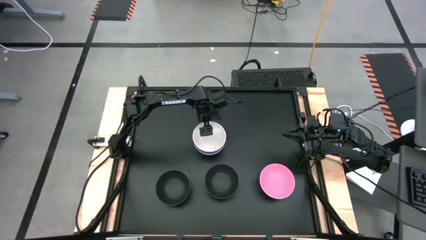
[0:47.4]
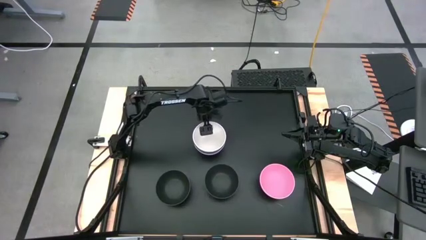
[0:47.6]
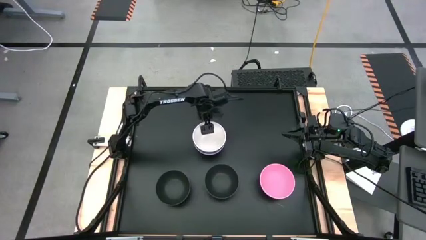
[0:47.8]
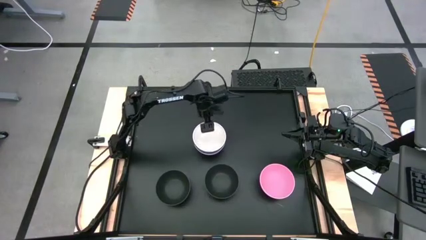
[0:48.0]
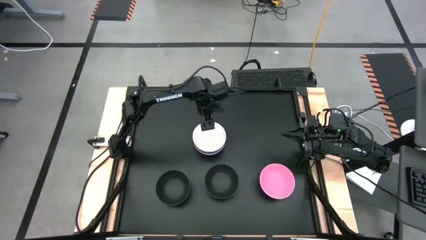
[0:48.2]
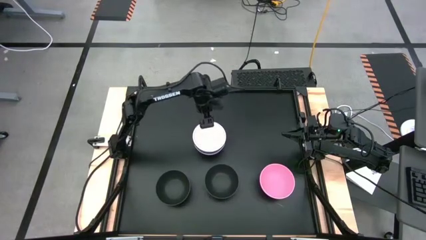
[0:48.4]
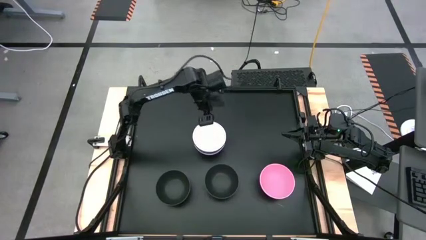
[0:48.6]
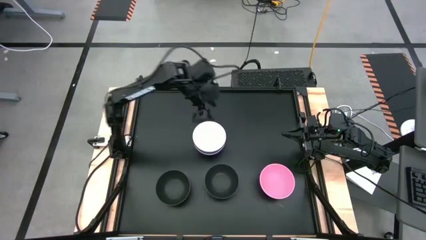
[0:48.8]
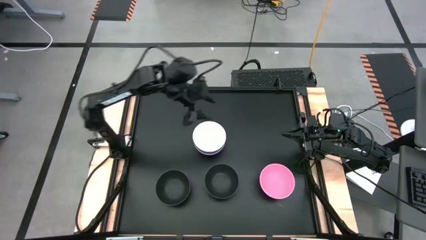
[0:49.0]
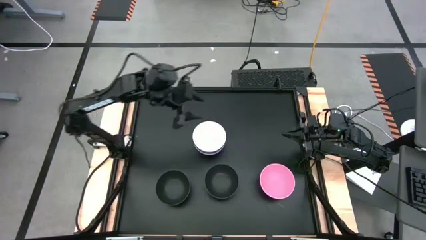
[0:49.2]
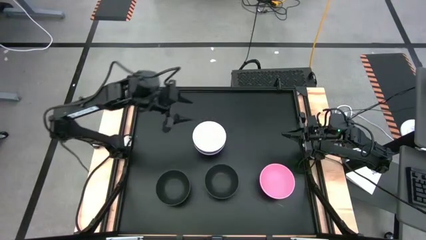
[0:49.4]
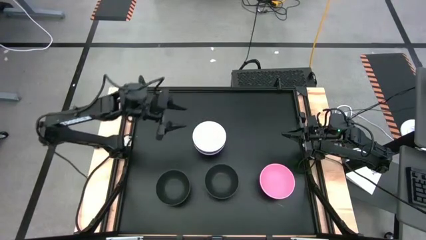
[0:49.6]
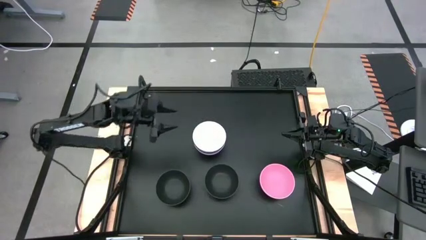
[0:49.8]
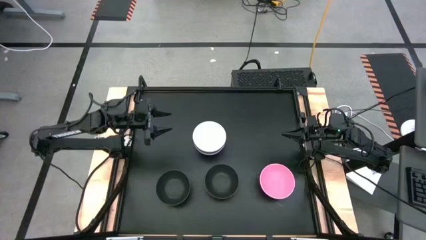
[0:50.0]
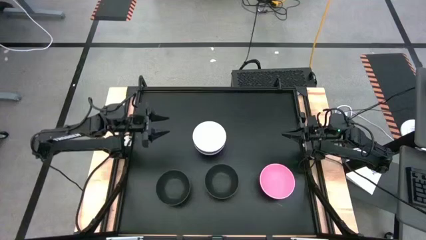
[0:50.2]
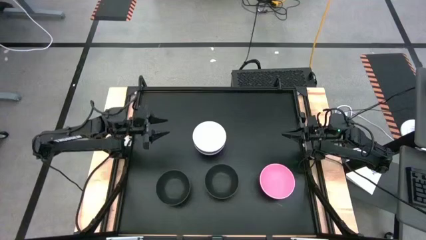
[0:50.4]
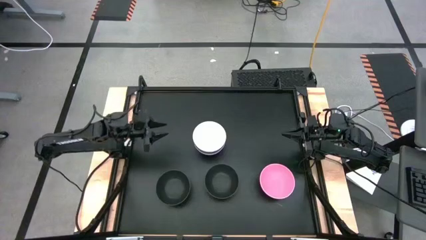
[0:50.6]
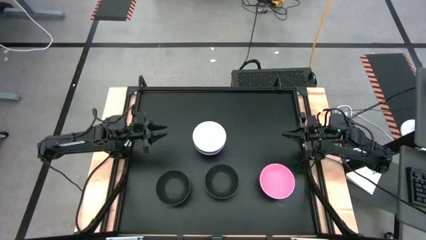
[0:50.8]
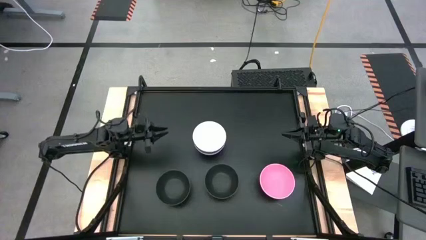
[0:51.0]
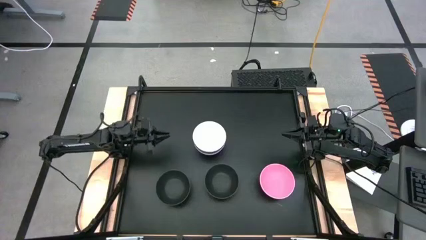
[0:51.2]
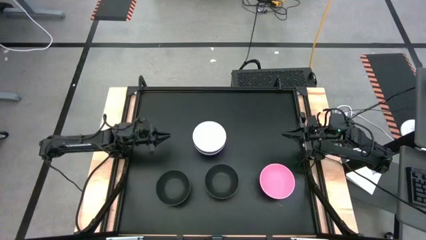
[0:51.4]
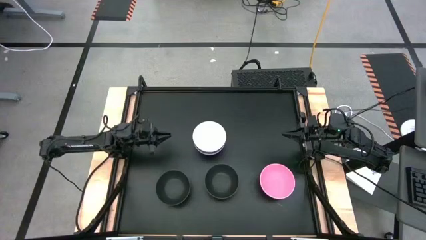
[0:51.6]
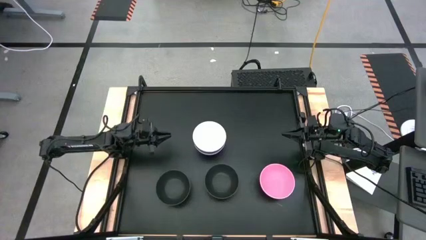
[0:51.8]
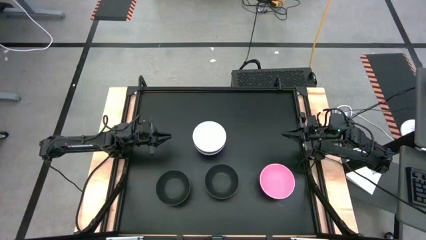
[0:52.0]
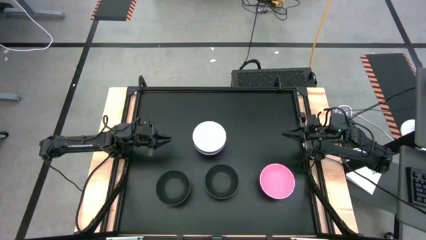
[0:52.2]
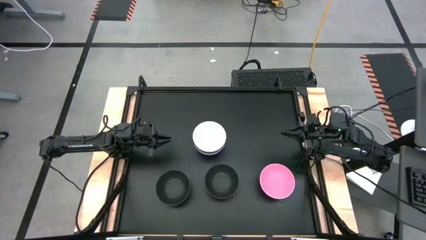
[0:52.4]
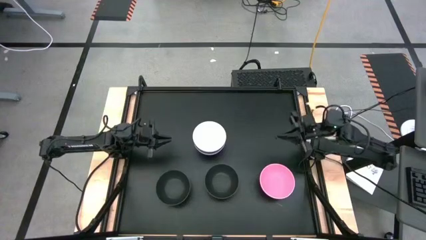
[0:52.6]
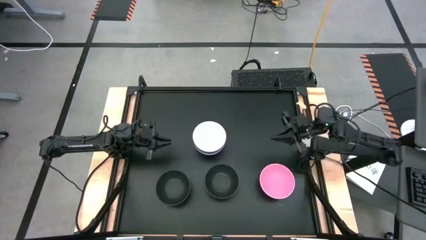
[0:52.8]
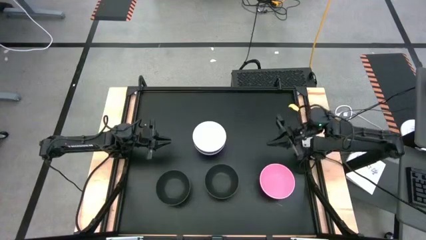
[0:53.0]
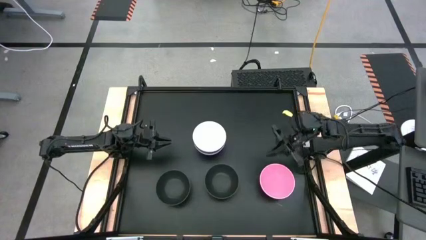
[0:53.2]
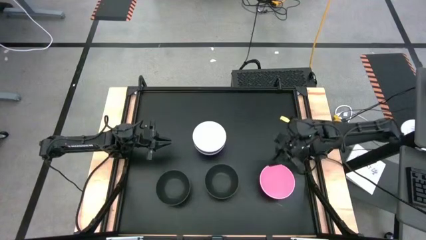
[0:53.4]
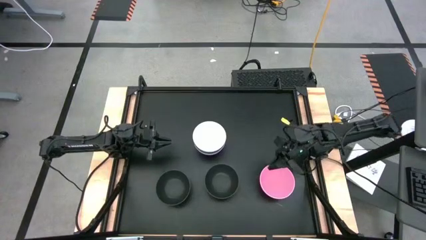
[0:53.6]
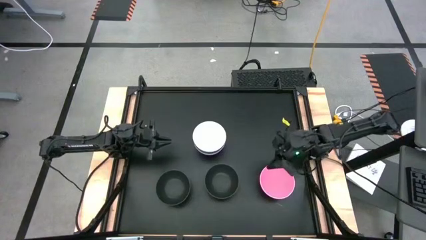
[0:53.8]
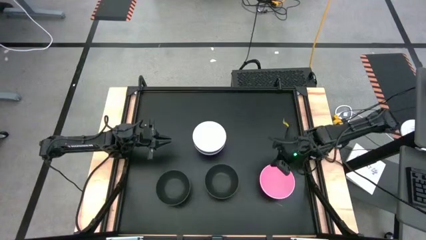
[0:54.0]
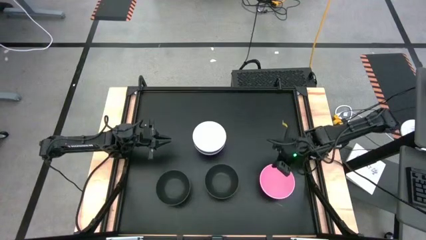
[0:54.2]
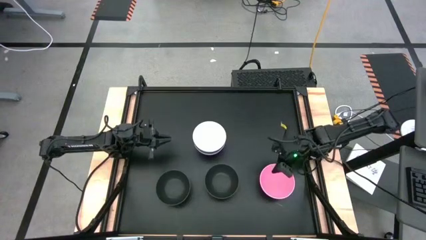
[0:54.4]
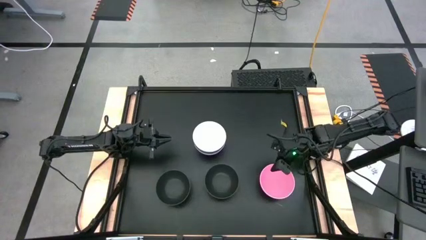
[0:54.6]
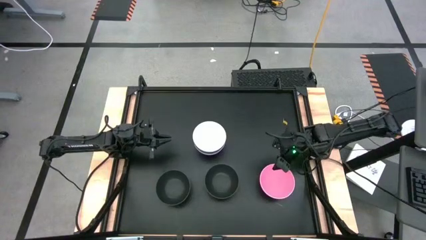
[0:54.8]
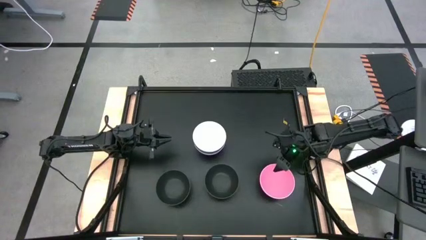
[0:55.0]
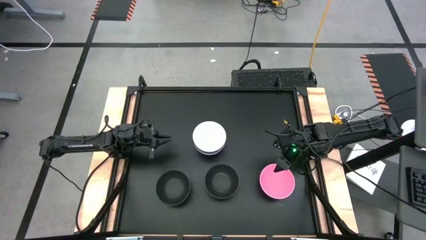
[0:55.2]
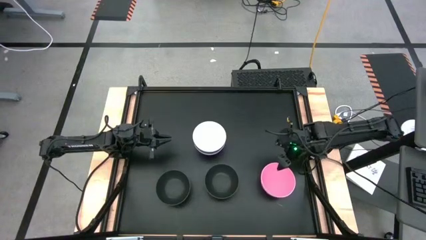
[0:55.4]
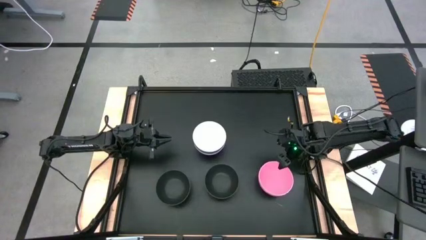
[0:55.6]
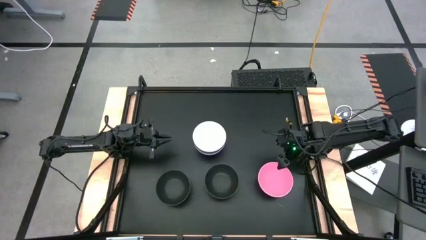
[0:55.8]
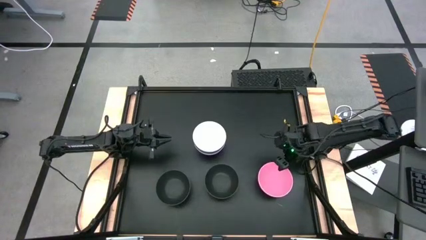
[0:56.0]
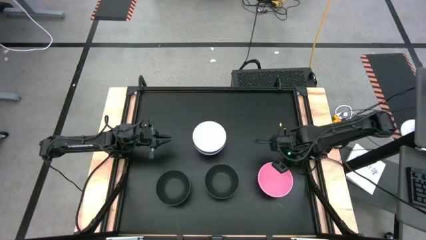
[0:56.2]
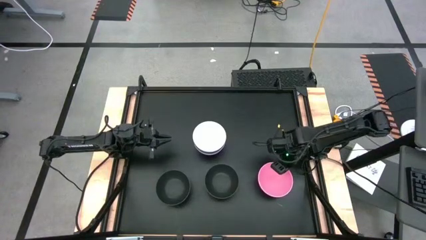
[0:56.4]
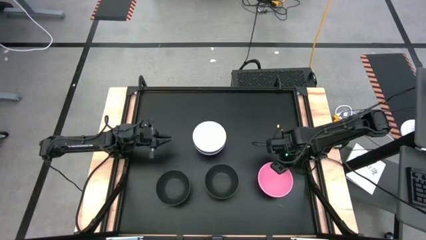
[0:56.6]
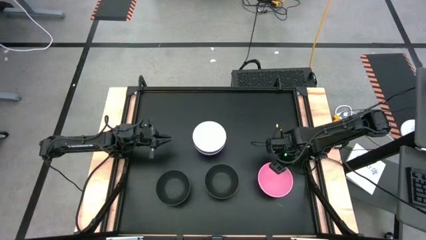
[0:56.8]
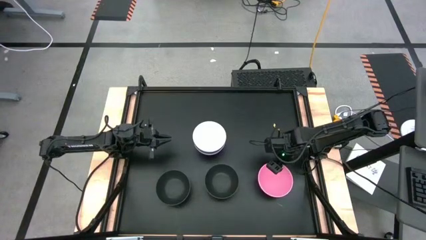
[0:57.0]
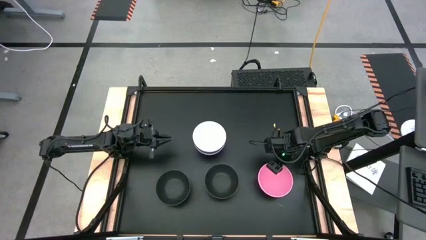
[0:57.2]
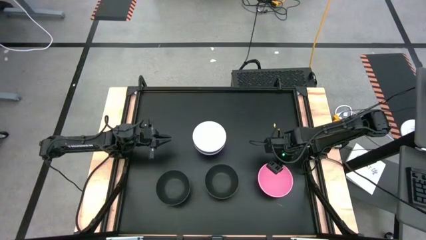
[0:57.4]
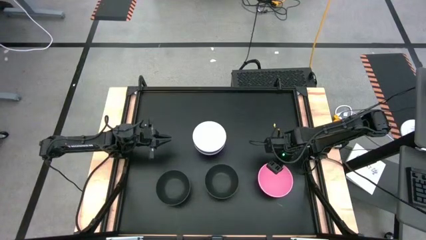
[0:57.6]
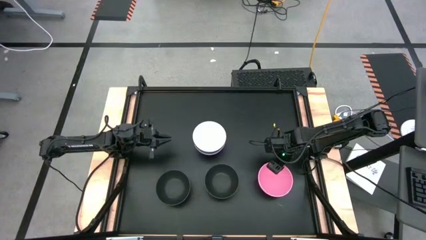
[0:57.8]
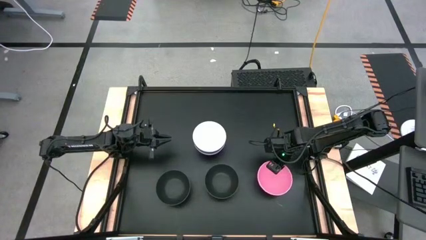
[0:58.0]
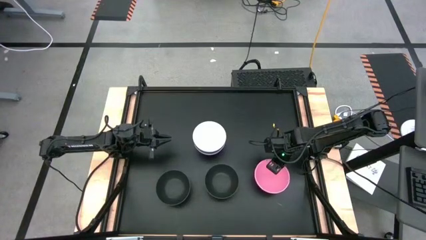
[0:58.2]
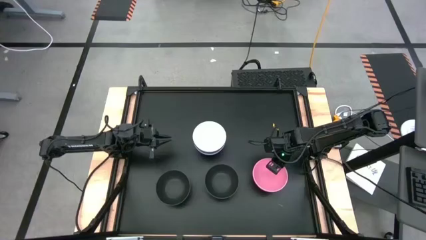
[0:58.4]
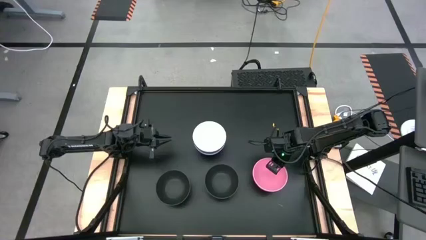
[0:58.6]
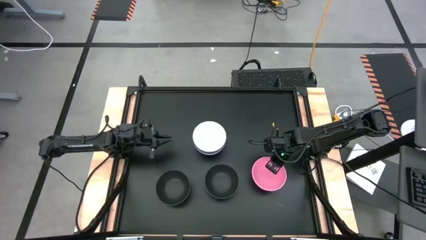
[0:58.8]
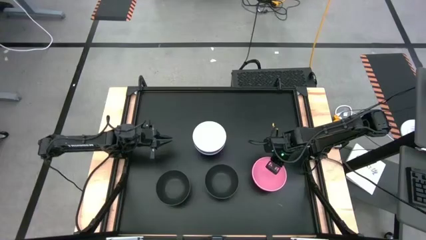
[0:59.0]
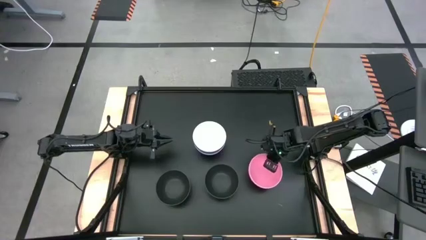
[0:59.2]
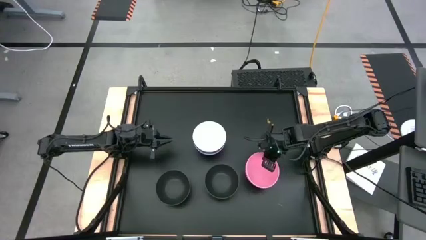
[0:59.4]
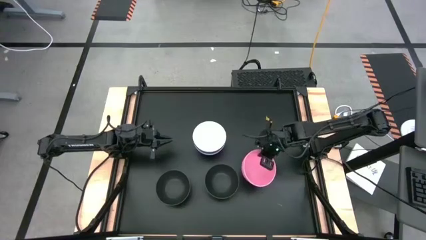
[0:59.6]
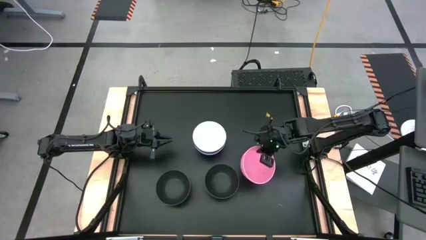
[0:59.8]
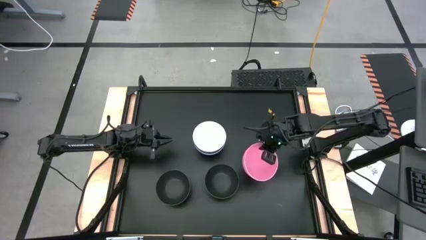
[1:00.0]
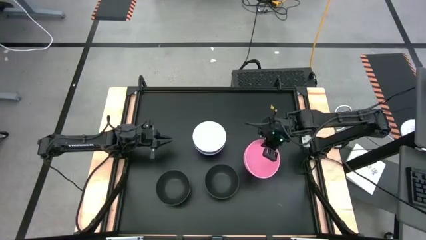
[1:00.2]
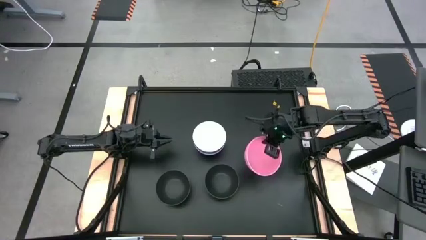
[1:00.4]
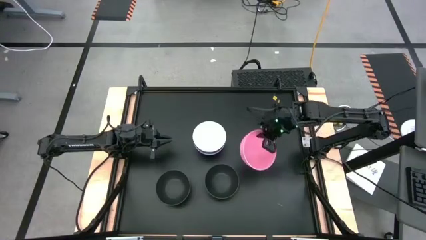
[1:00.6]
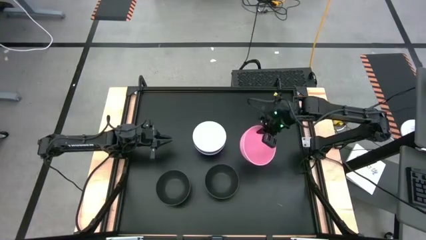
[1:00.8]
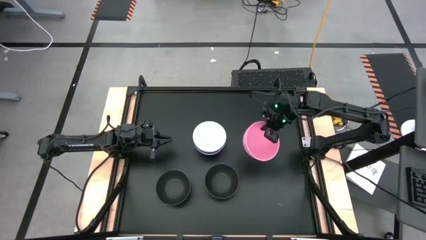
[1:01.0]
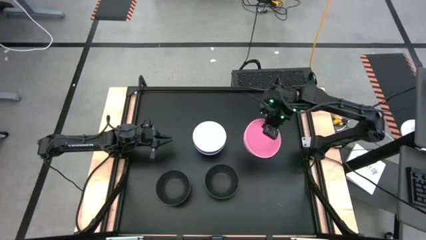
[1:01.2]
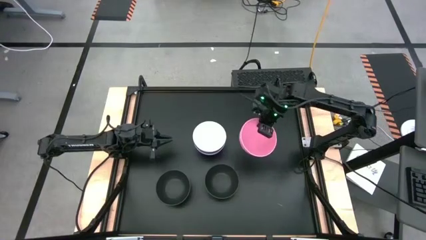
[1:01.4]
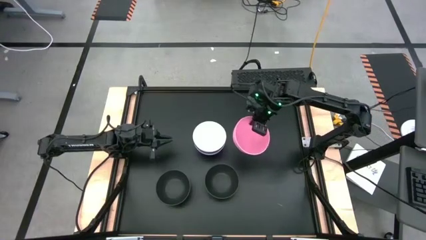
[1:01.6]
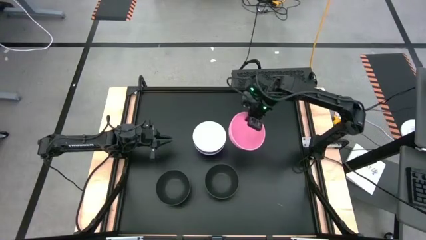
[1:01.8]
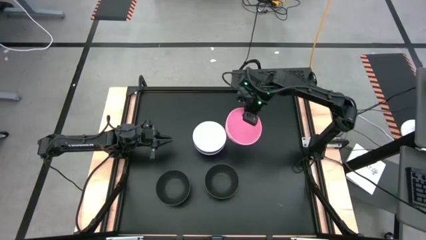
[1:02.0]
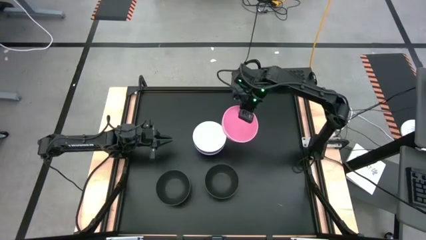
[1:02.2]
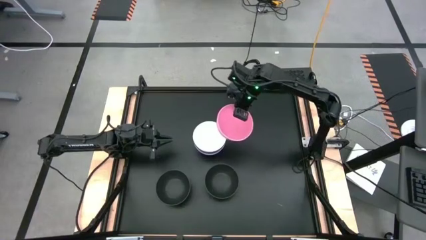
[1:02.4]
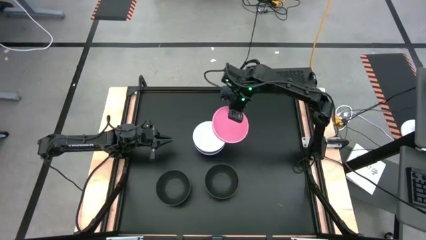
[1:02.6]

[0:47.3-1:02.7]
Task: Nest bowls inside each other
Stack the pink bowl on top of the white bowl
